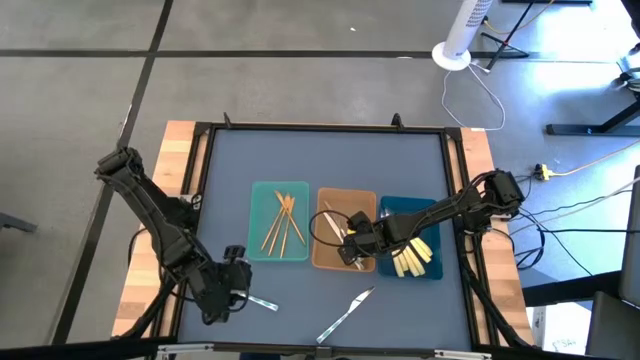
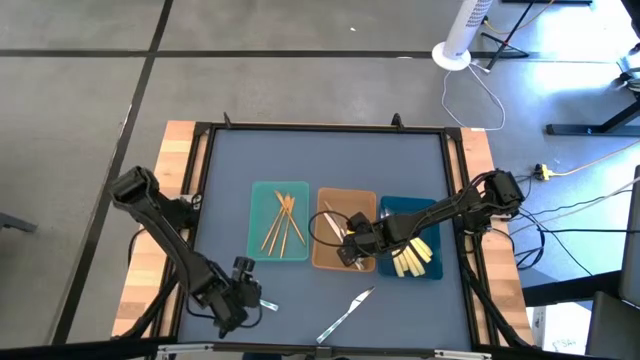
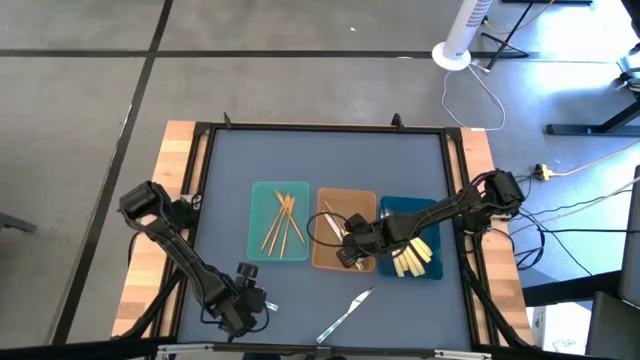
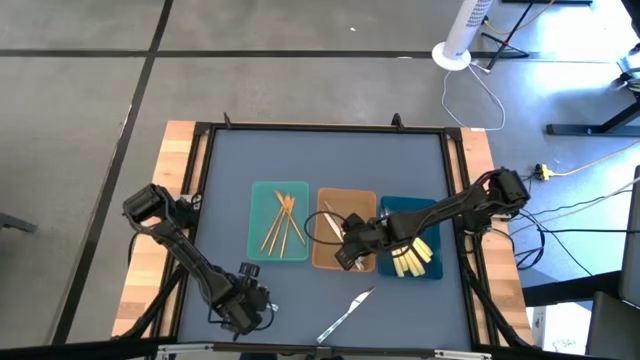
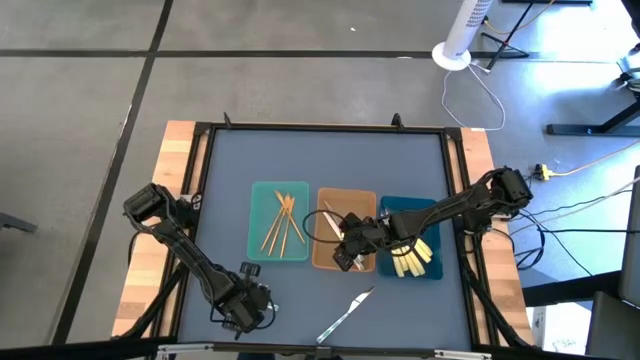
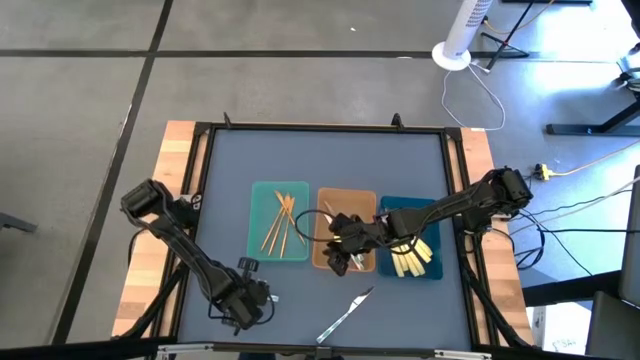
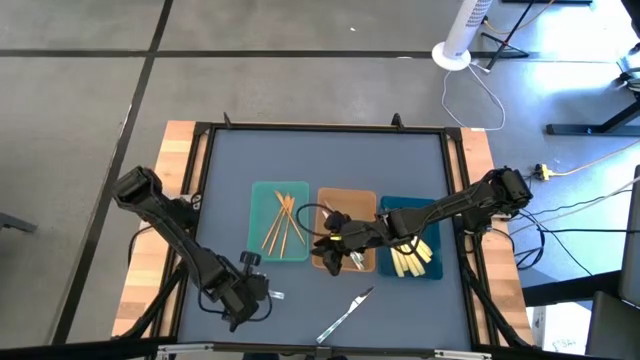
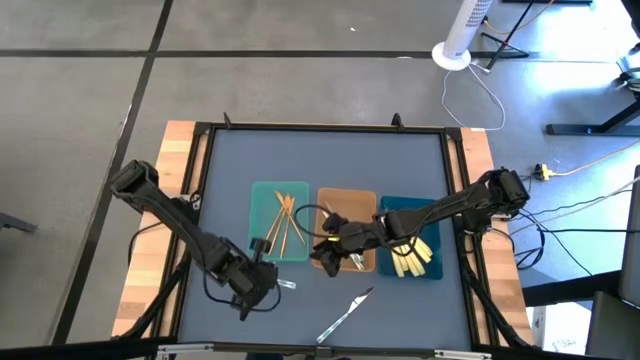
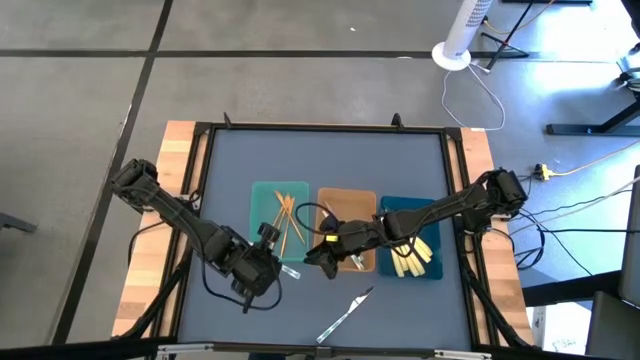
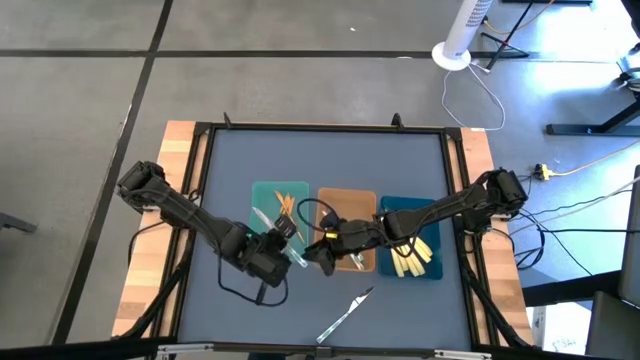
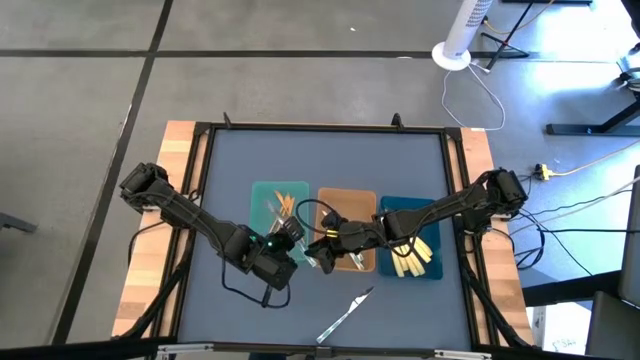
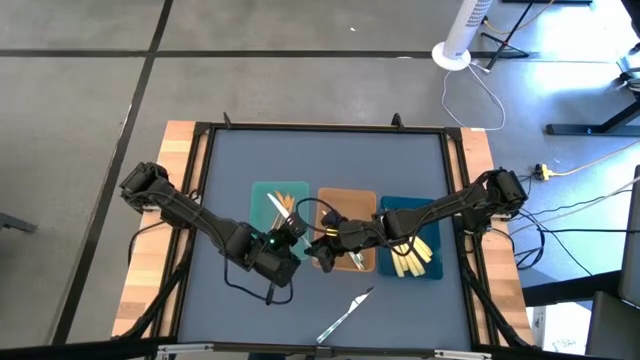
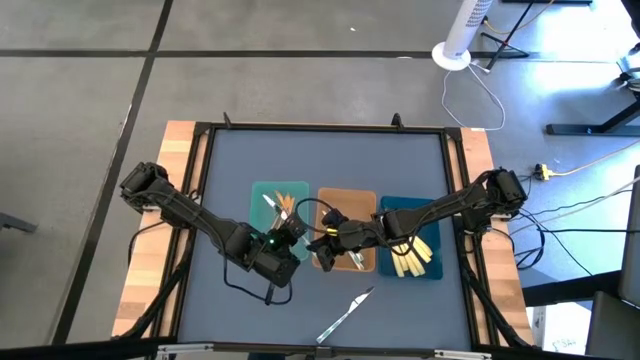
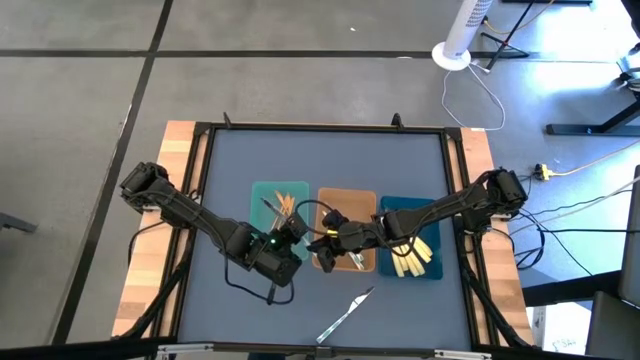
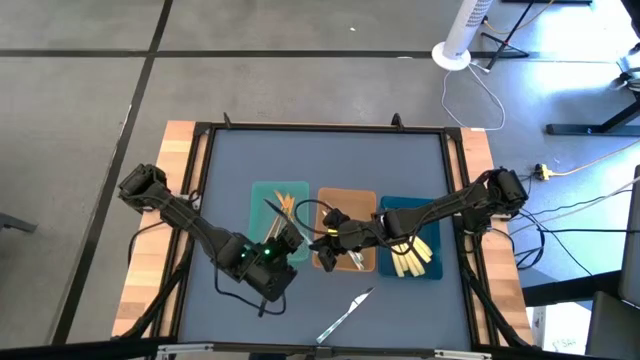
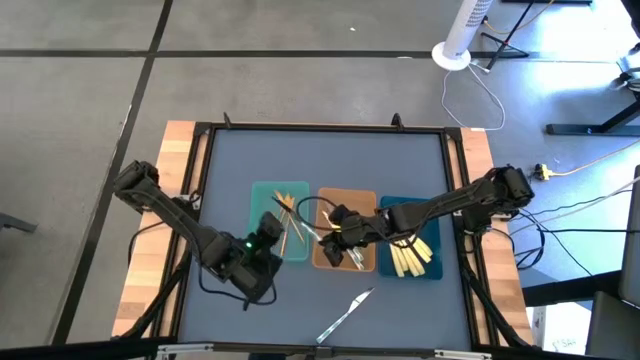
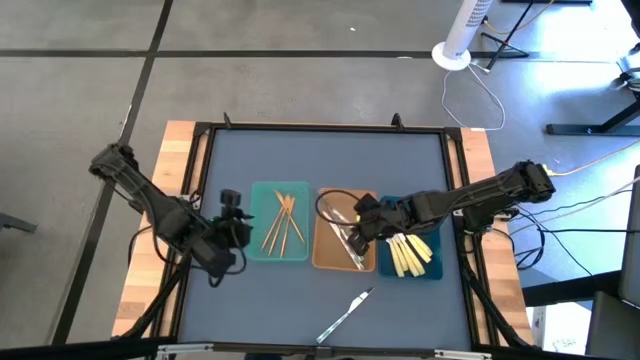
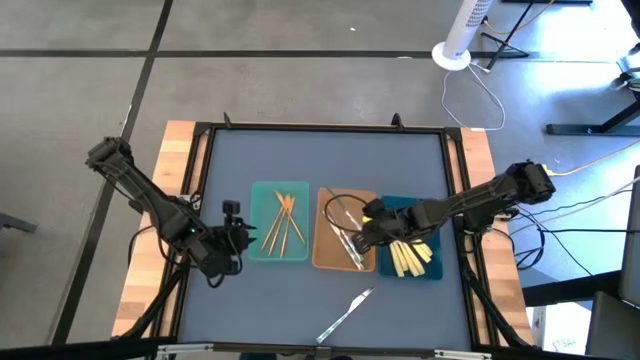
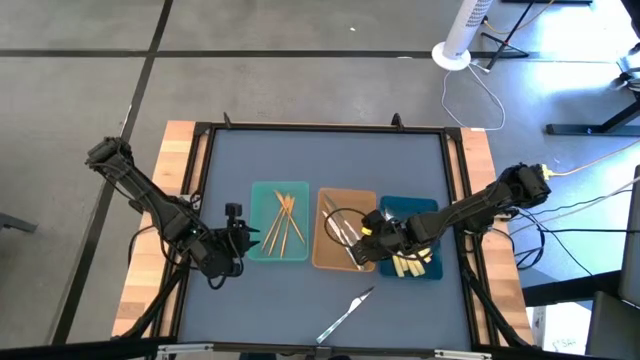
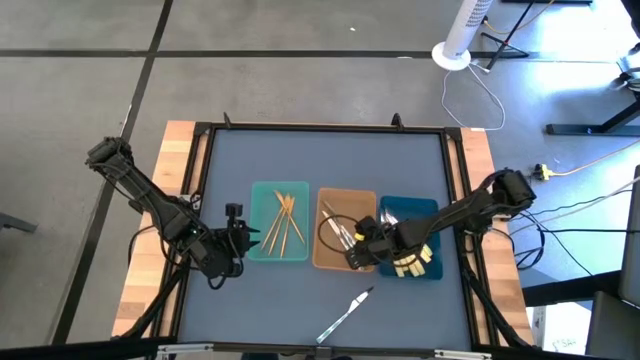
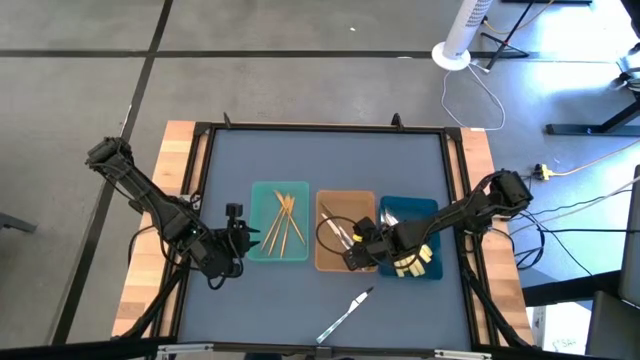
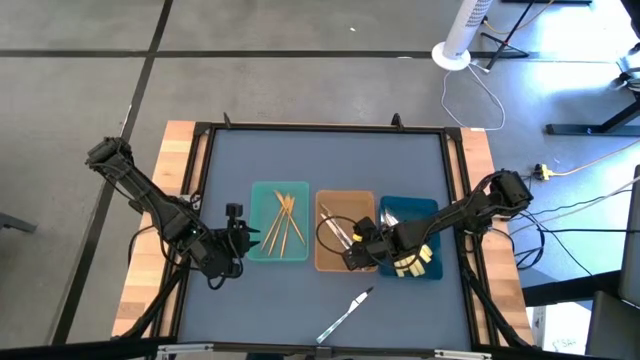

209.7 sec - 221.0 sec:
Task: Sort silverware by color (type)
Put the blue knife into the orange bin

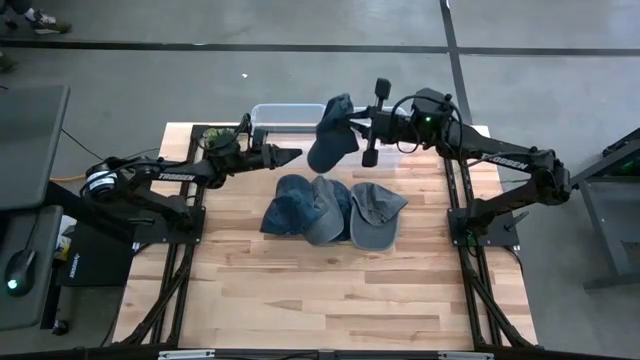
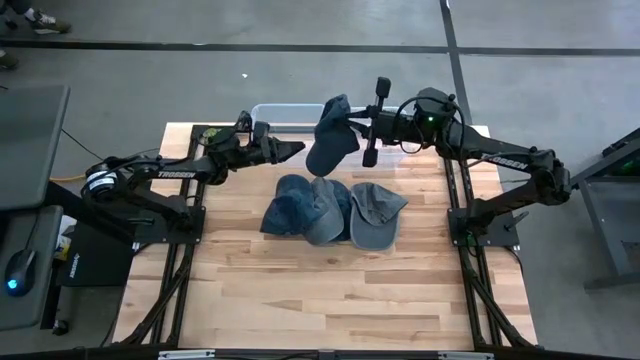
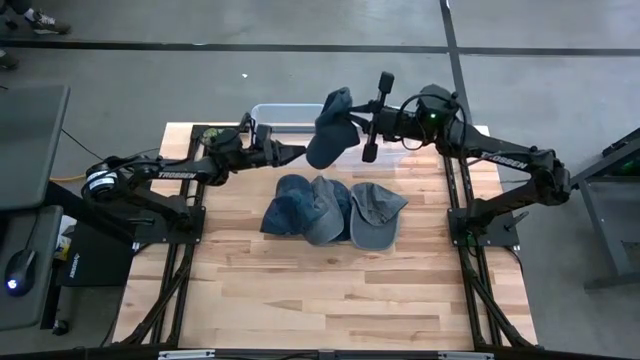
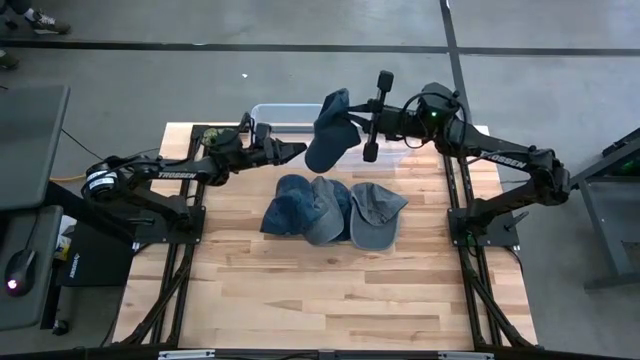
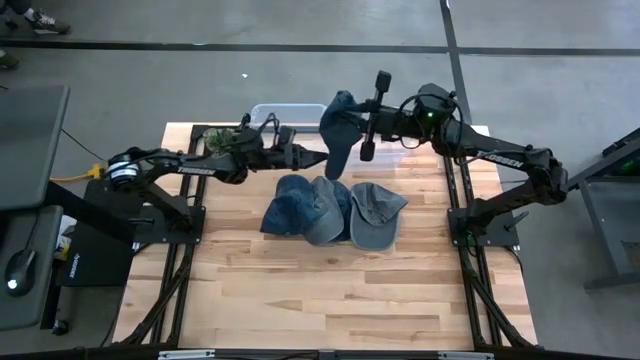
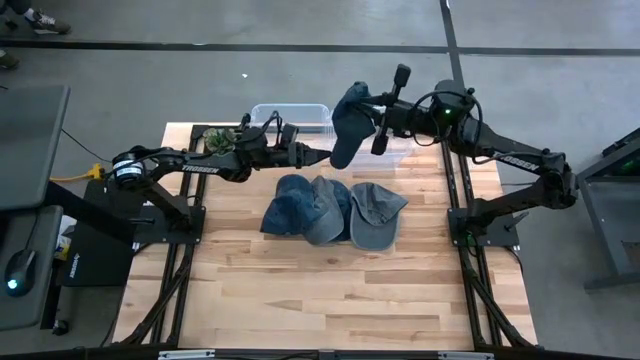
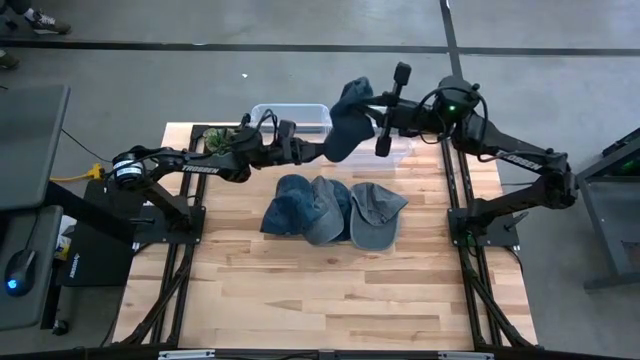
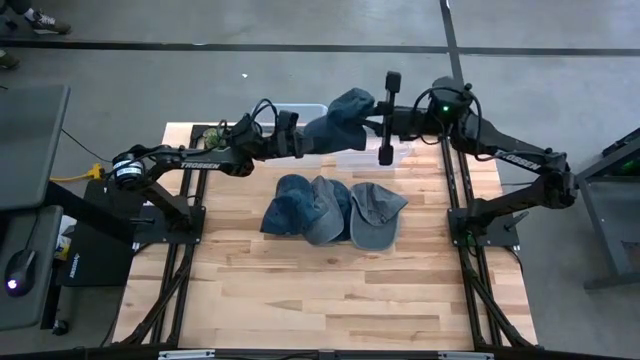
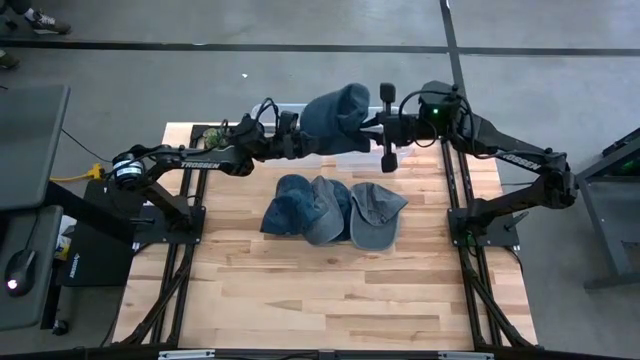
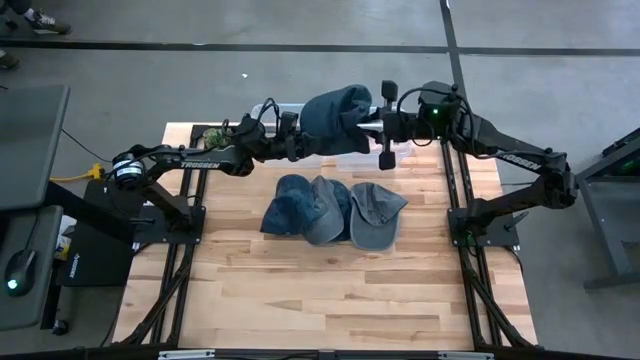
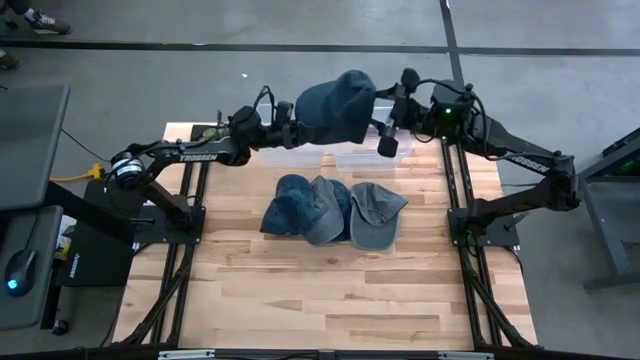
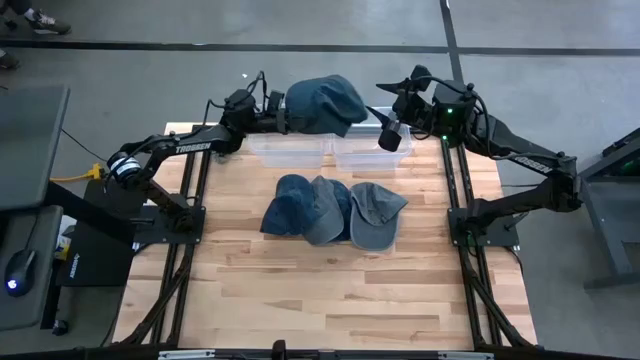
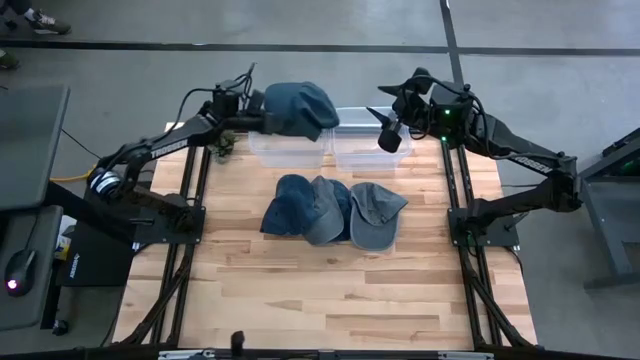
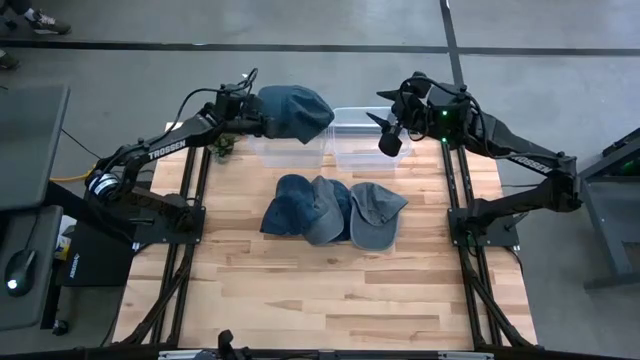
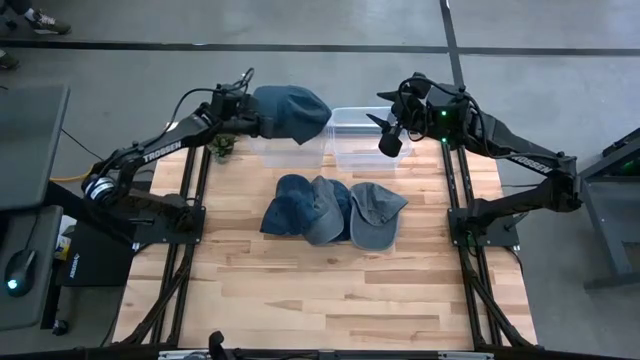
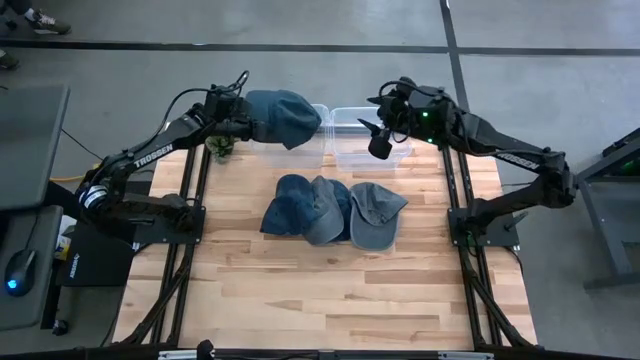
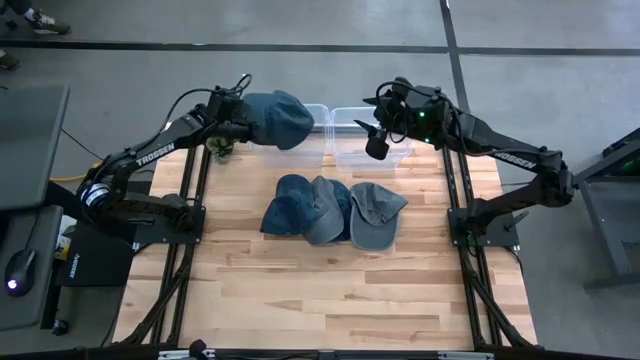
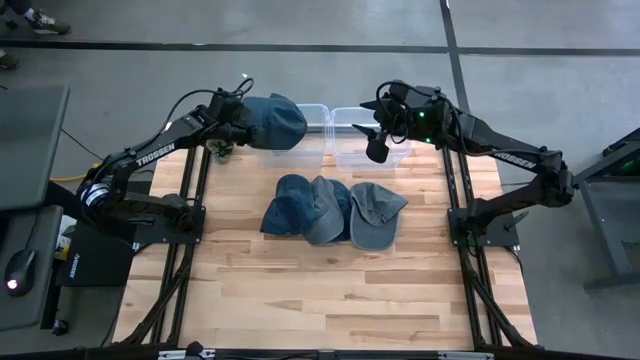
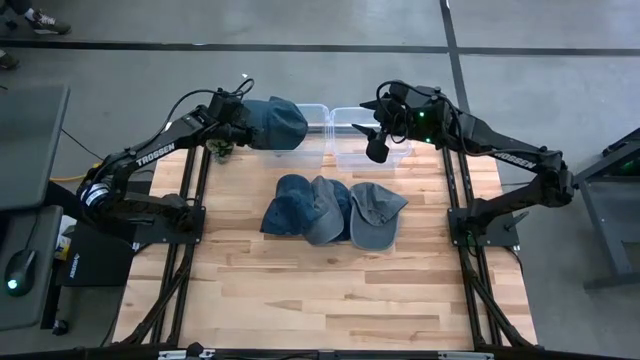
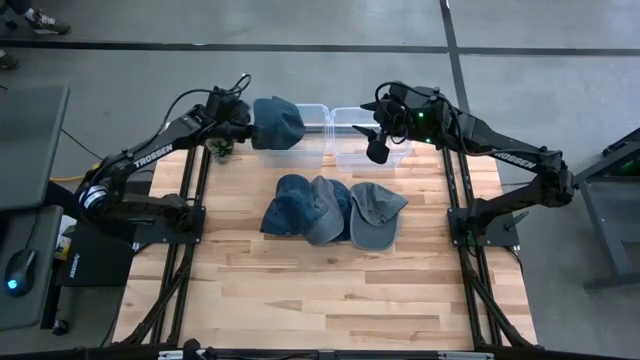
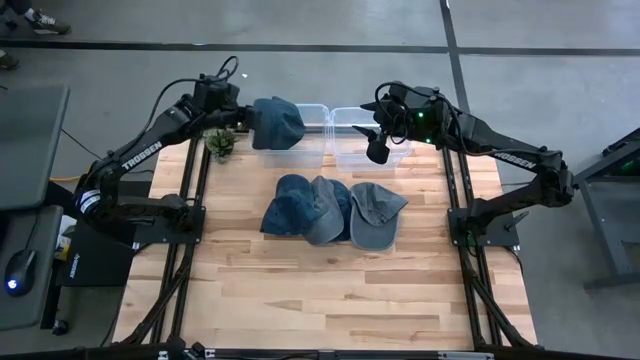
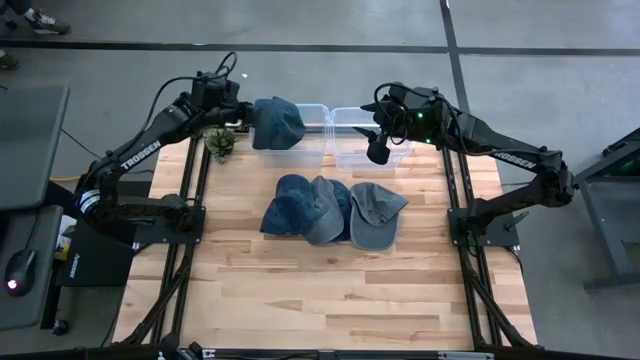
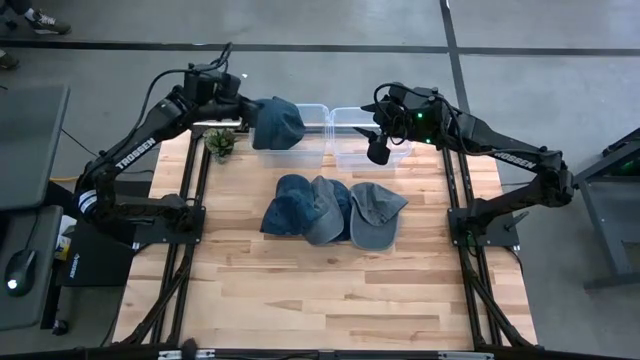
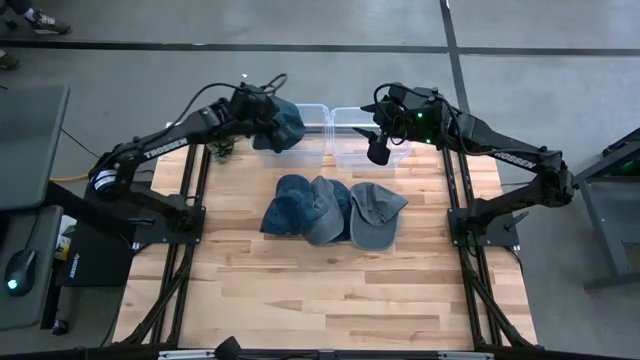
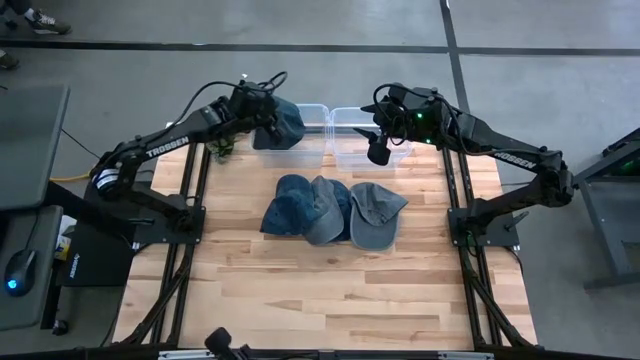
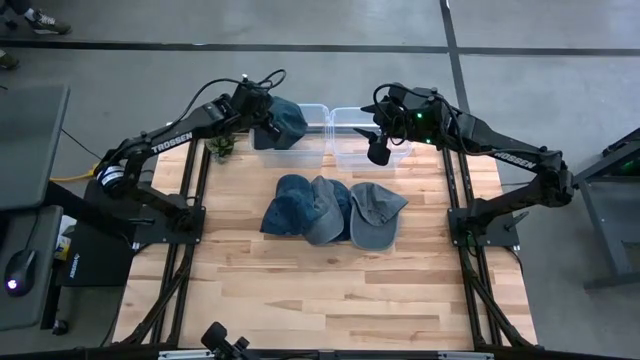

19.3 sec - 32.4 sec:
Task: Pick & Place hat
Put the left top blue cap into the left transparent bin
